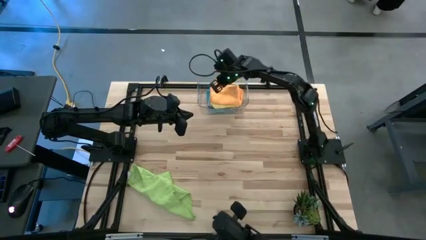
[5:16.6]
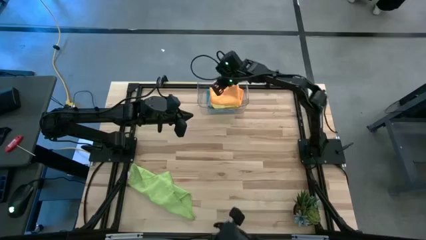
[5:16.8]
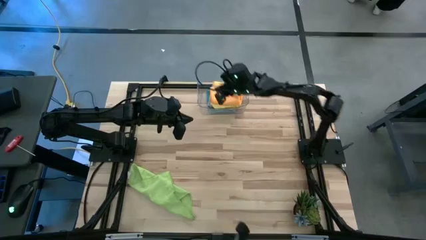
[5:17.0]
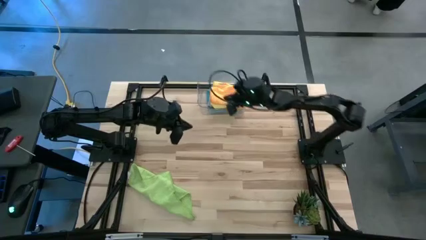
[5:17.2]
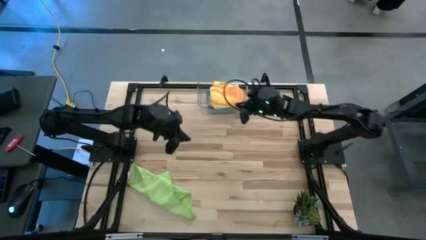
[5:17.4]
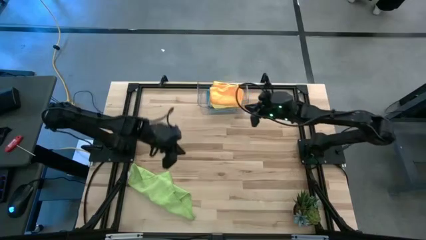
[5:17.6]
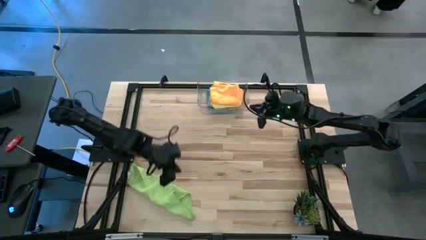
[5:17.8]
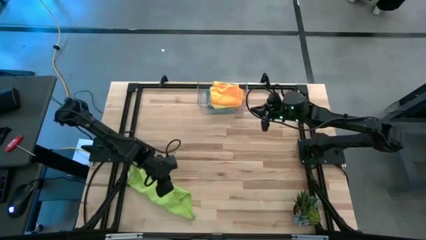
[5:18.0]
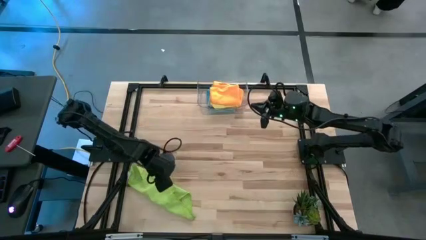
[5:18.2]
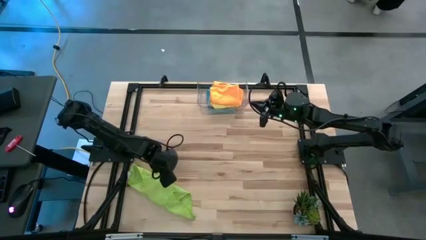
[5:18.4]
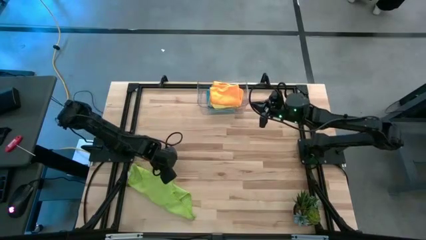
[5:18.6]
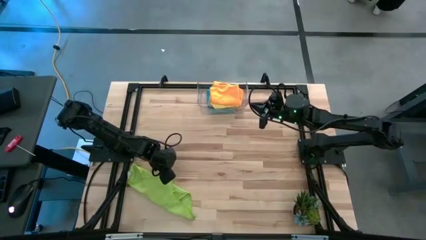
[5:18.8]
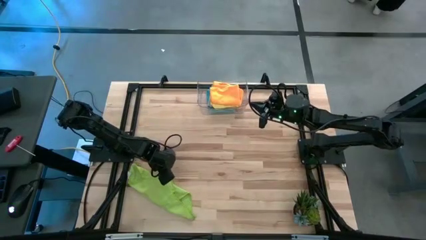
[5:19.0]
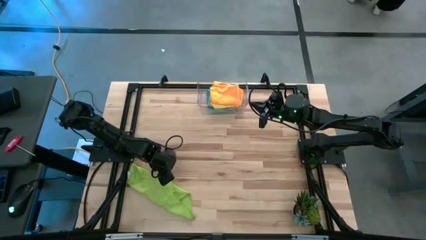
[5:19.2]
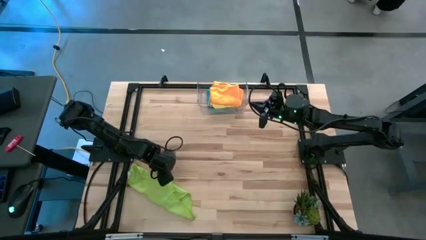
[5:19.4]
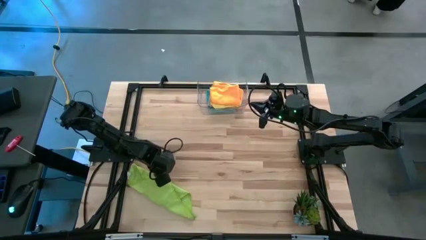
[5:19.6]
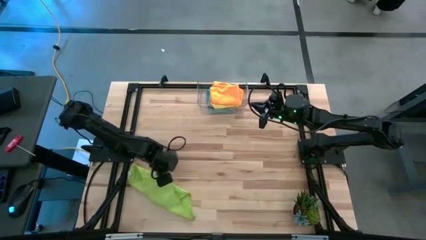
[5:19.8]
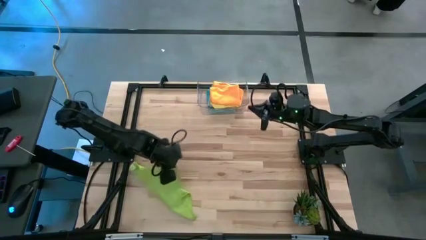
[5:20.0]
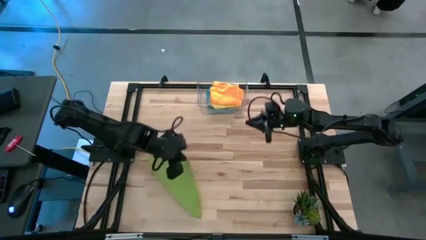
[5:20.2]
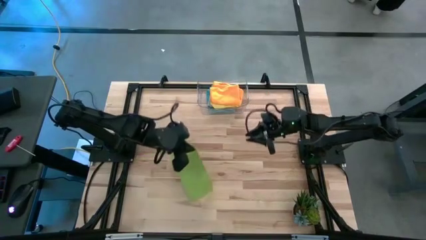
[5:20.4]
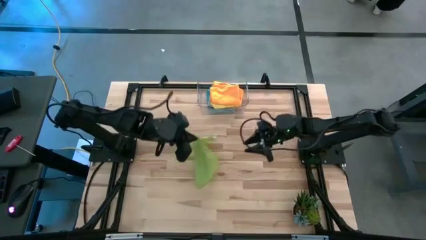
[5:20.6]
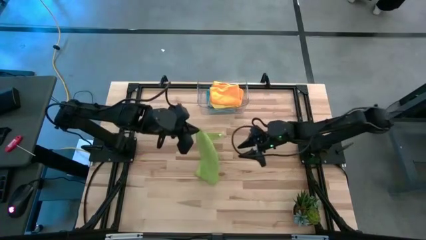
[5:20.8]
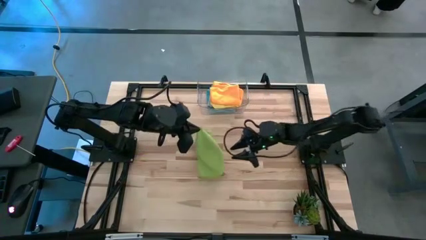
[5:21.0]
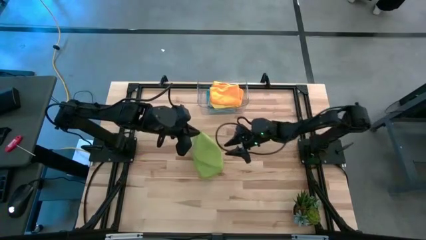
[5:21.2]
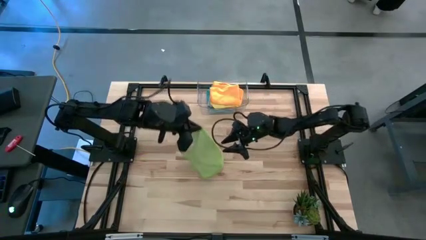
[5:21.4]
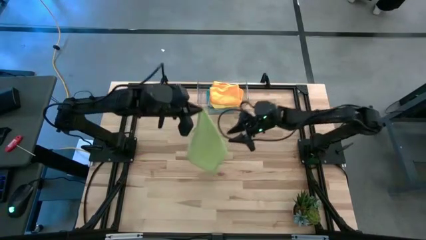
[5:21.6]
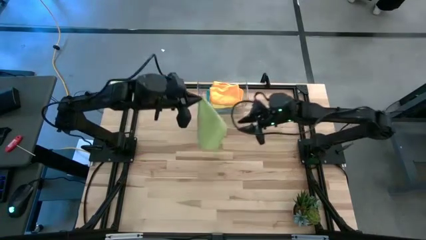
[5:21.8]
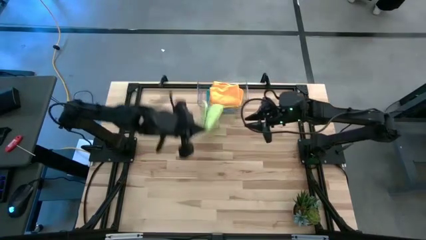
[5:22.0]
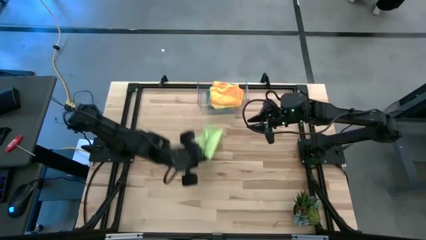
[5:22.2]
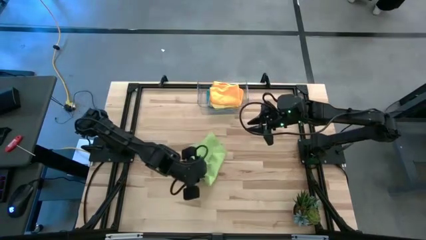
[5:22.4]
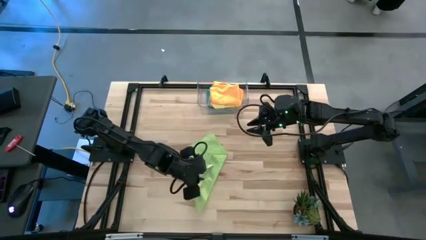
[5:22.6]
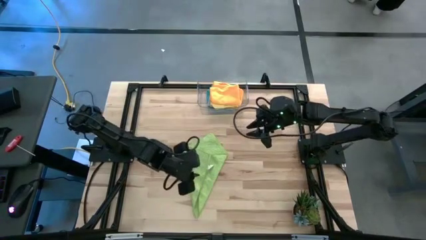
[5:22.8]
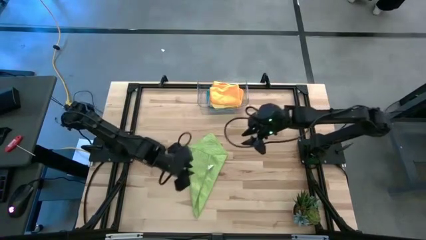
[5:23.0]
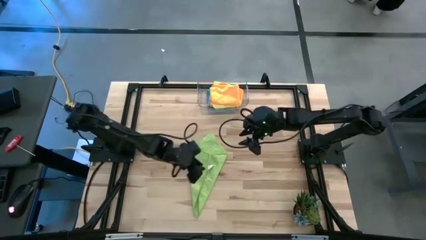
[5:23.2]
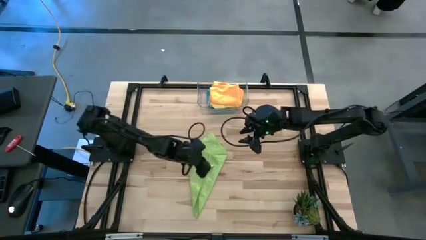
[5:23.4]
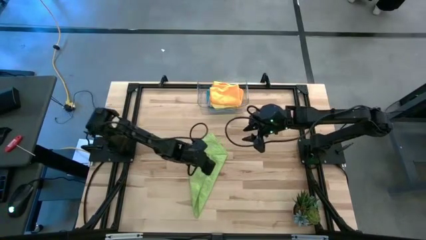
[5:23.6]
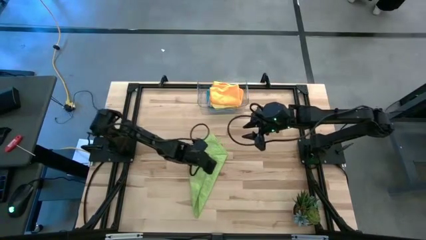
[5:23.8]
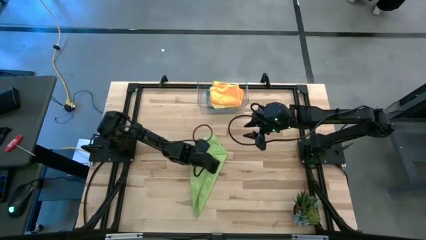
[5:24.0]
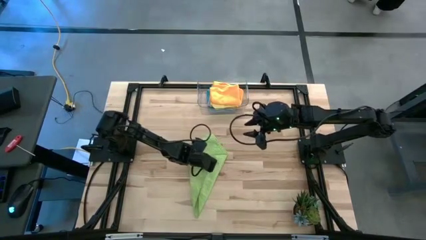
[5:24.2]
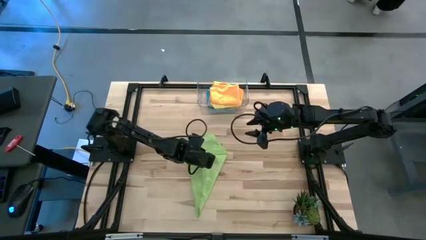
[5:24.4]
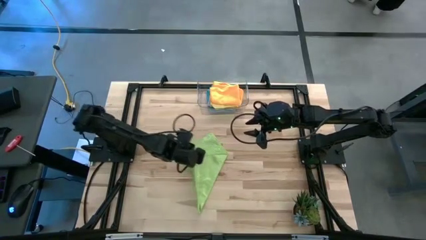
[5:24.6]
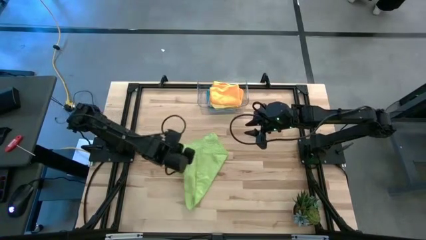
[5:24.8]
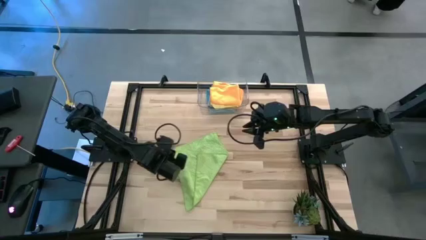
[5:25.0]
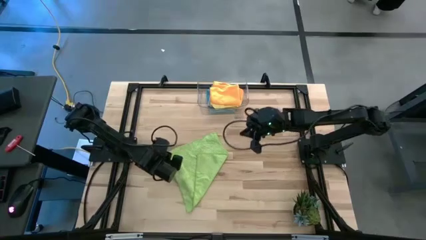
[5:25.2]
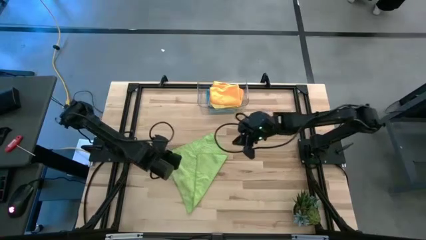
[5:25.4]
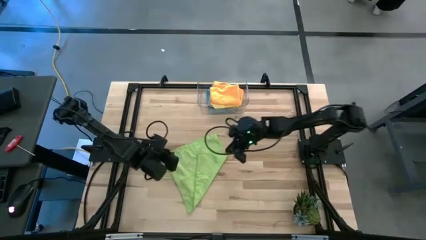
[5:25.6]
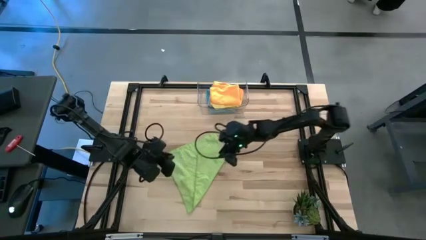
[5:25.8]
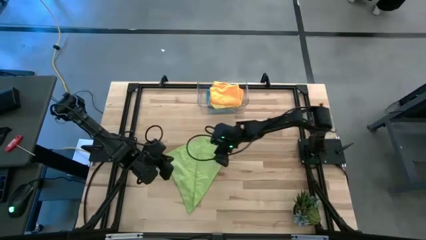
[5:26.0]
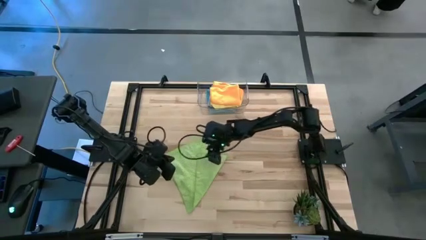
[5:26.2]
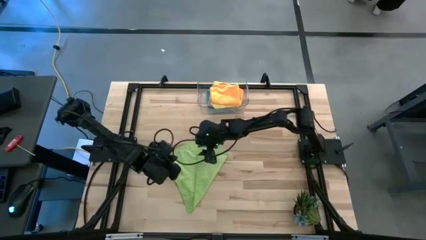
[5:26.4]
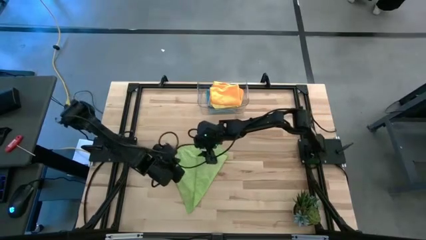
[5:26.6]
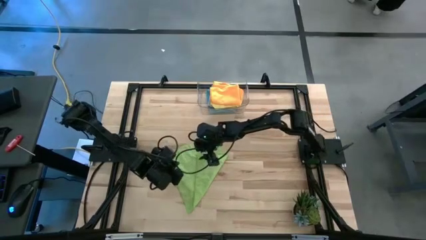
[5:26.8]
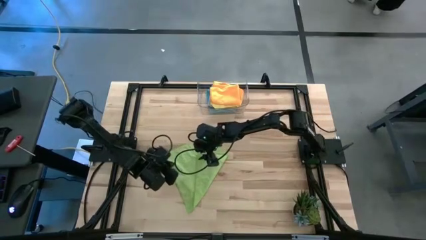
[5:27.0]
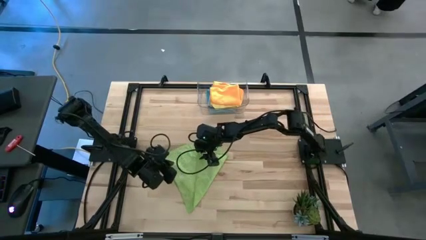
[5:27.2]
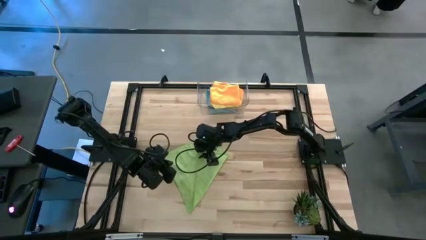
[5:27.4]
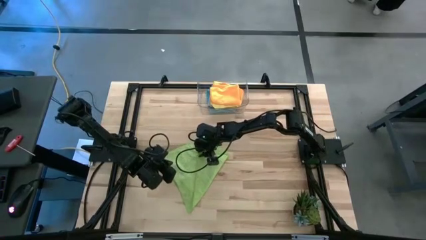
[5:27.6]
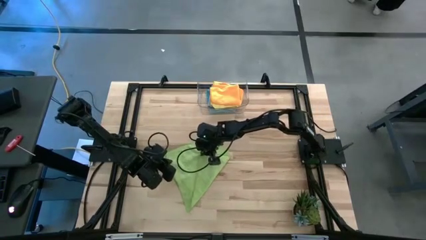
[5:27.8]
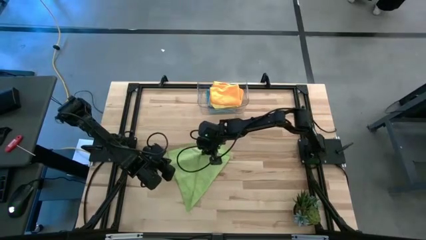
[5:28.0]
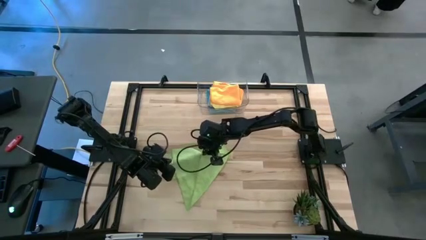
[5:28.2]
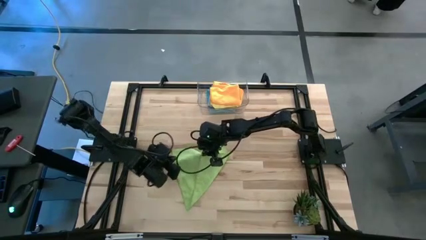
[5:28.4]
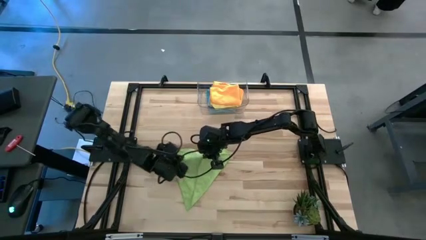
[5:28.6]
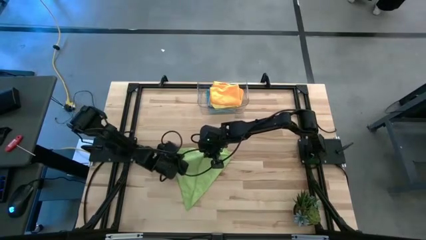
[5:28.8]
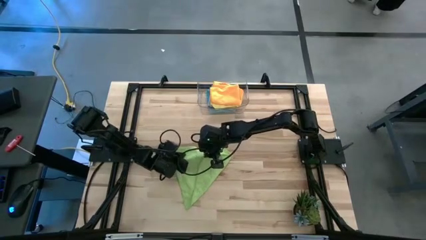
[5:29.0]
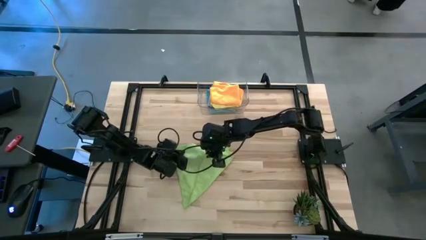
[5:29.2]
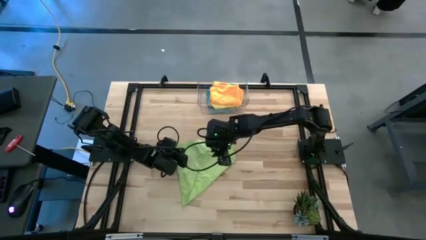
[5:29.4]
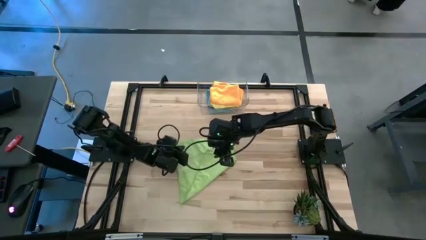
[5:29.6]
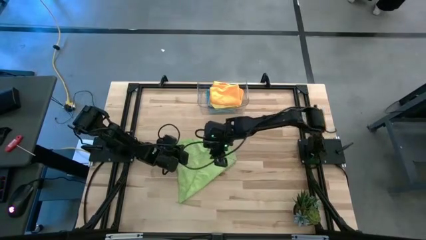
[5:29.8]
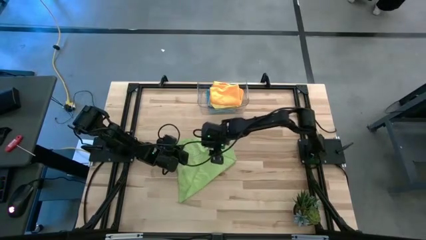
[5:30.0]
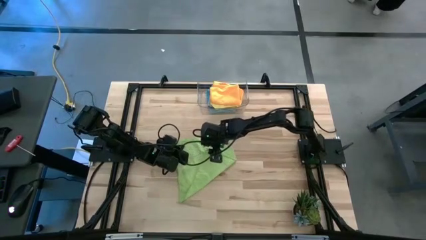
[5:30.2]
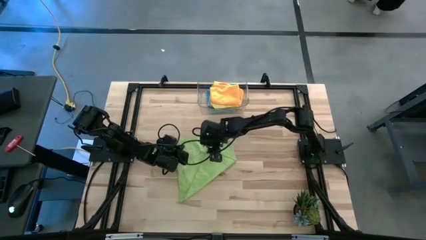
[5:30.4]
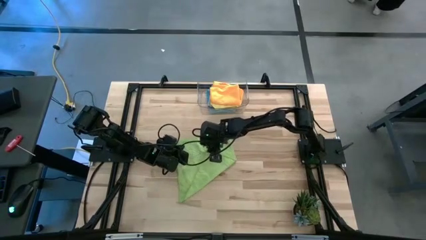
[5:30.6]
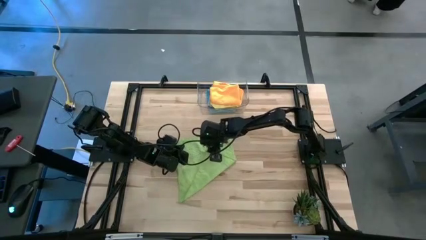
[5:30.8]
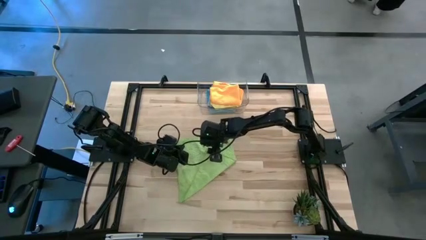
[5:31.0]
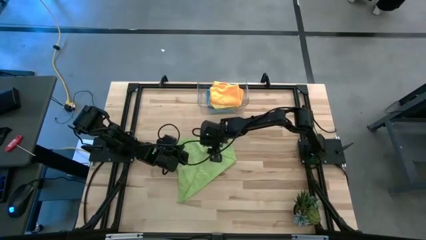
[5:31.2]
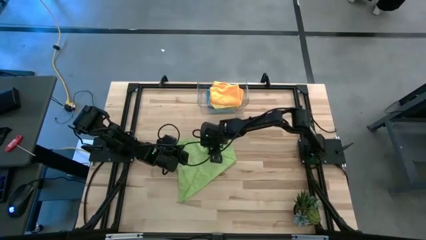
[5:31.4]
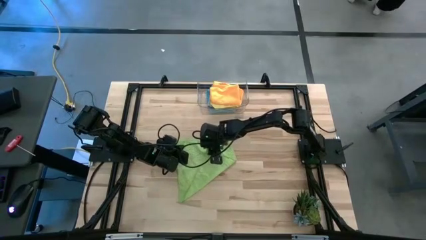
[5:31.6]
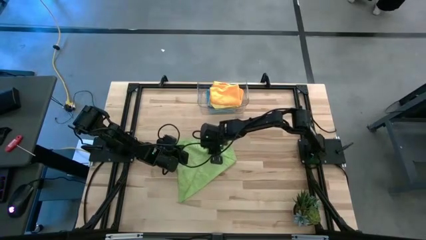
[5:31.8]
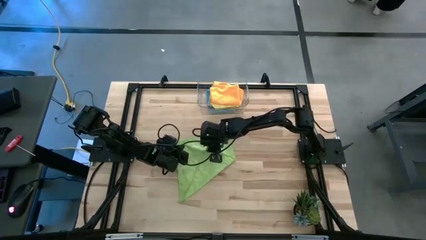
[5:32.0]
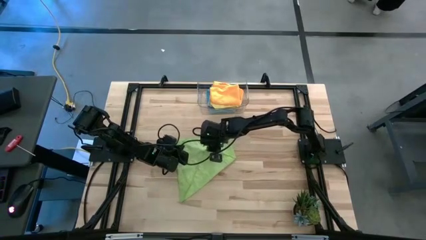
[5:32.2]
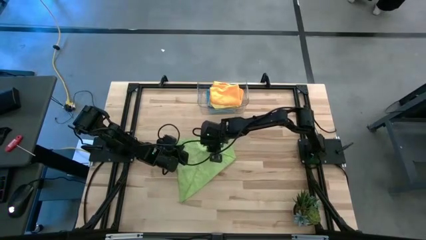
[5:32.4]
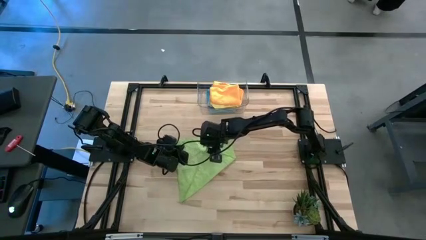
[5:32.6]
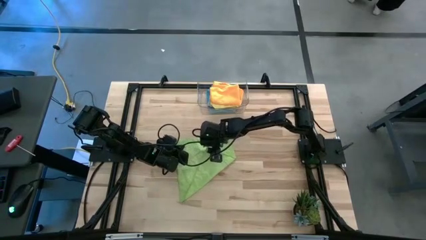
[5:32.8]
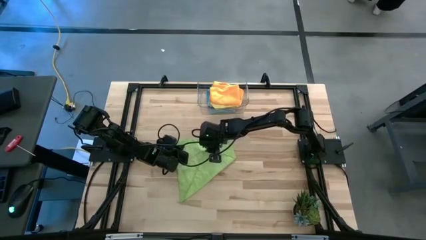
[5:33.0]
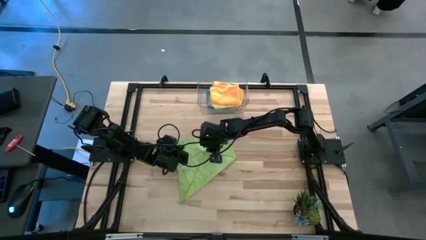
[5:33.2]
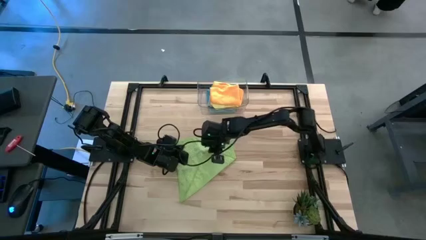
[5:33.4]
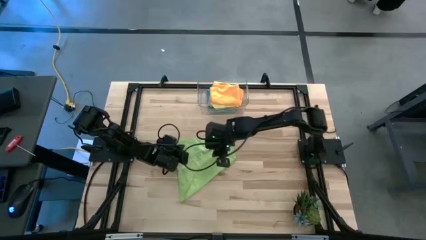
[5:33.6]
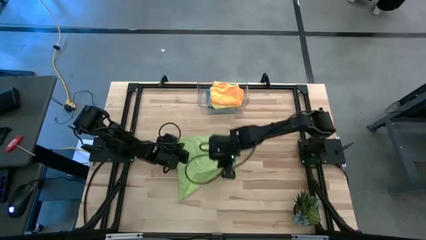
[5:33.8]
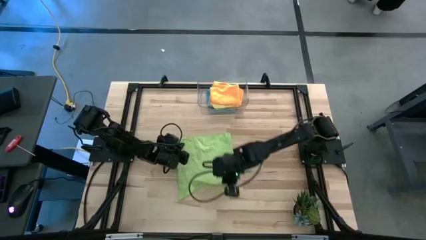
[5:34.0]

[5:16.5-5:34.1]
Task: Fold microfiber towels
Fold the green towel
